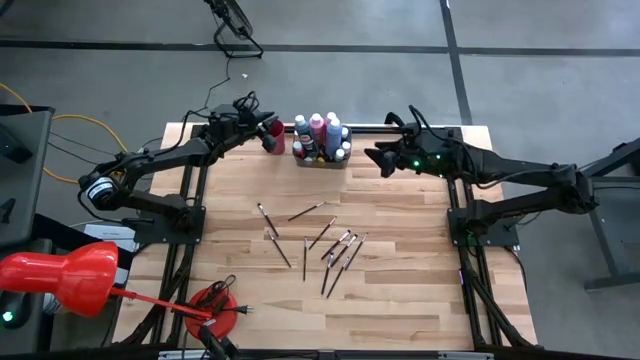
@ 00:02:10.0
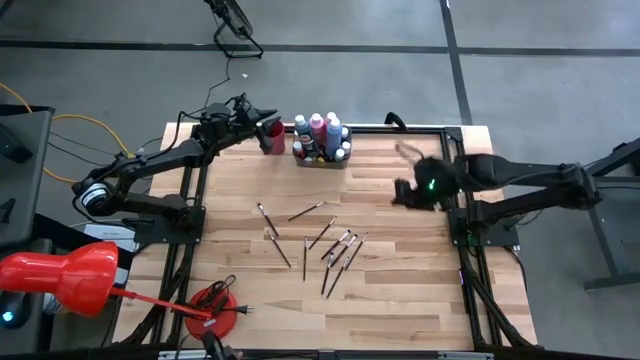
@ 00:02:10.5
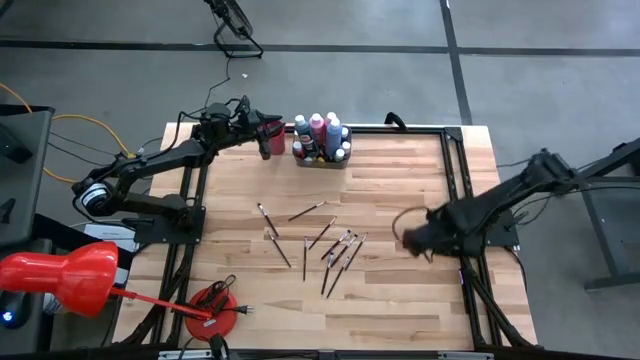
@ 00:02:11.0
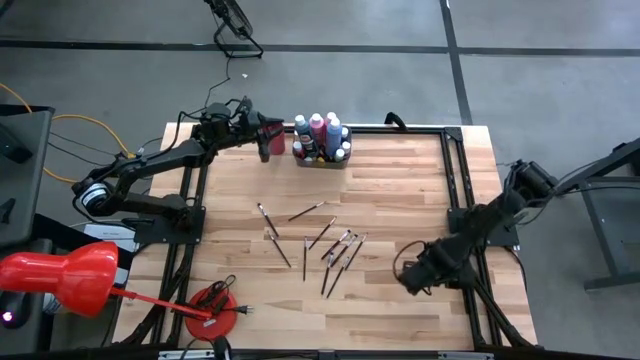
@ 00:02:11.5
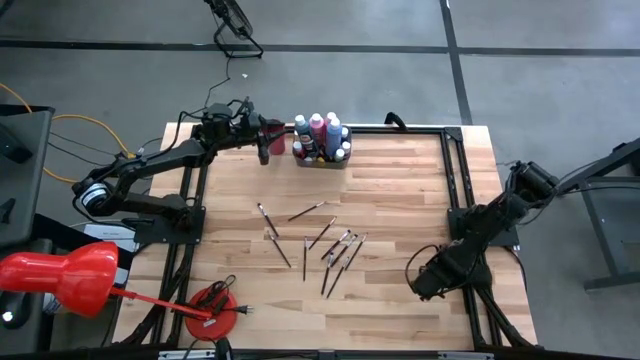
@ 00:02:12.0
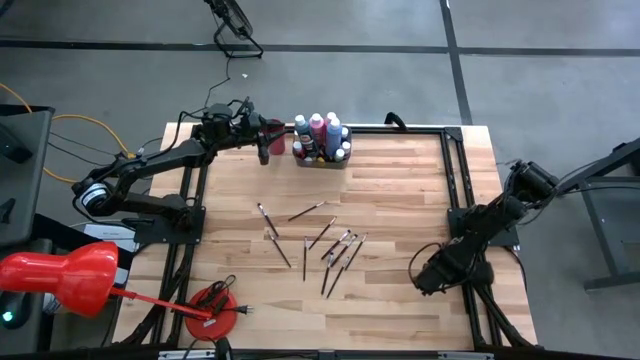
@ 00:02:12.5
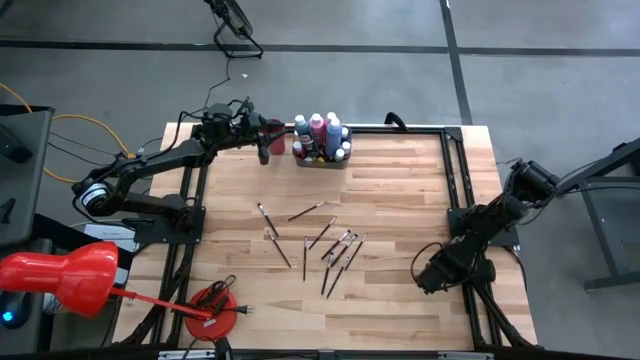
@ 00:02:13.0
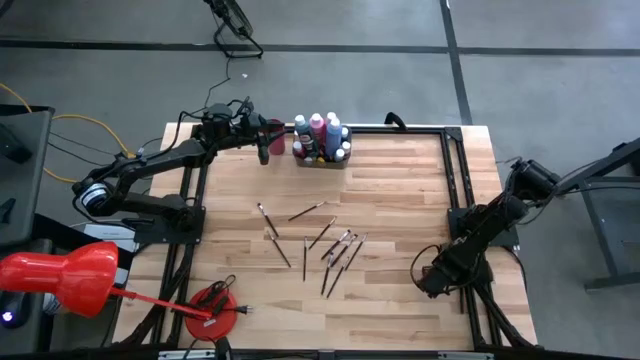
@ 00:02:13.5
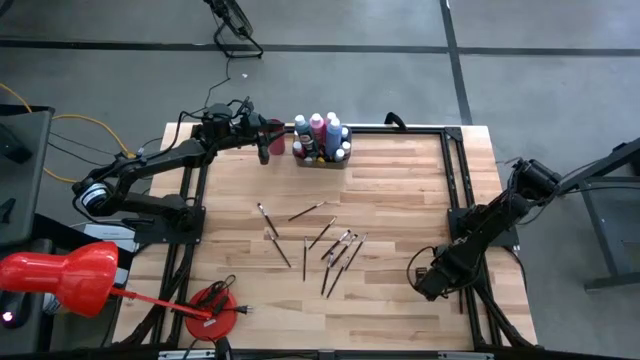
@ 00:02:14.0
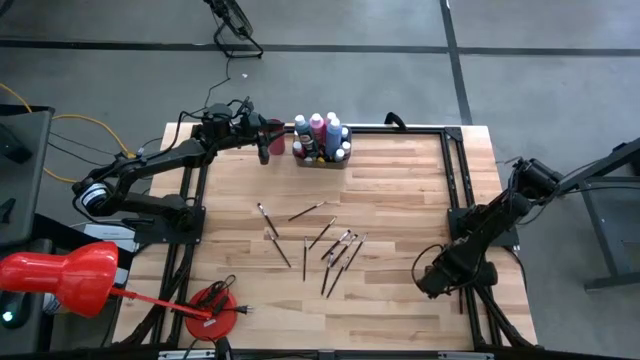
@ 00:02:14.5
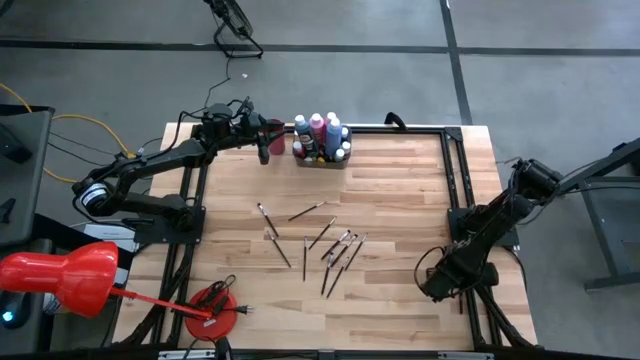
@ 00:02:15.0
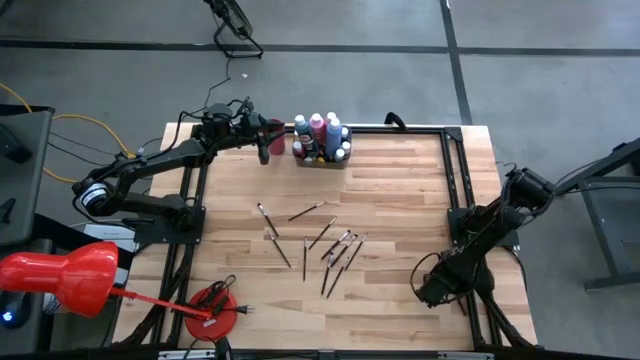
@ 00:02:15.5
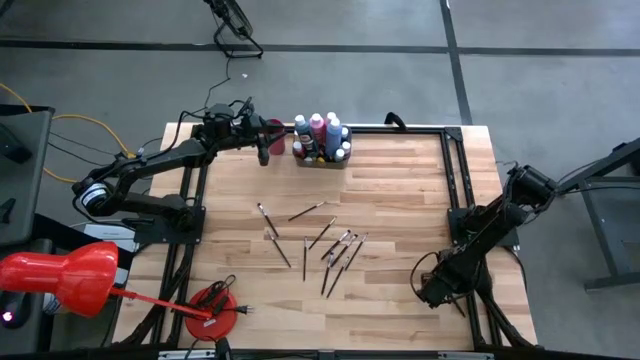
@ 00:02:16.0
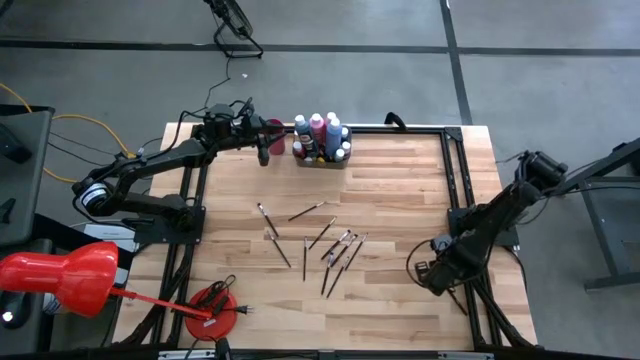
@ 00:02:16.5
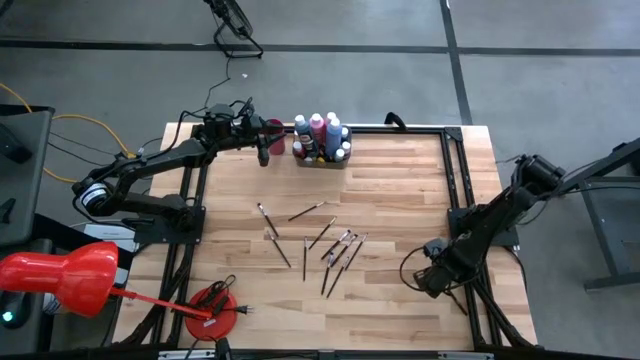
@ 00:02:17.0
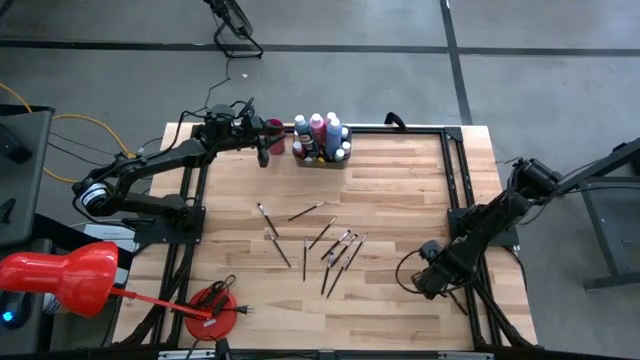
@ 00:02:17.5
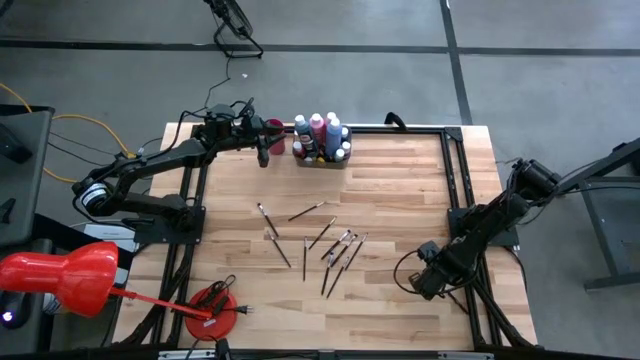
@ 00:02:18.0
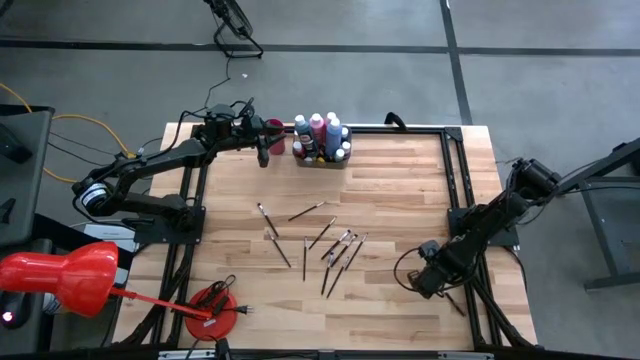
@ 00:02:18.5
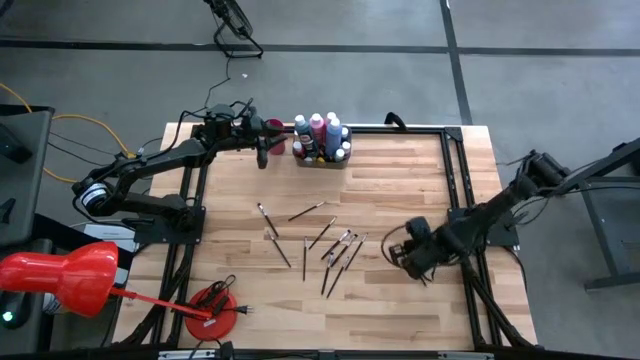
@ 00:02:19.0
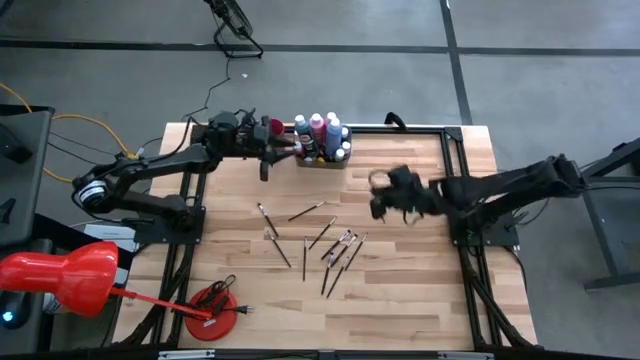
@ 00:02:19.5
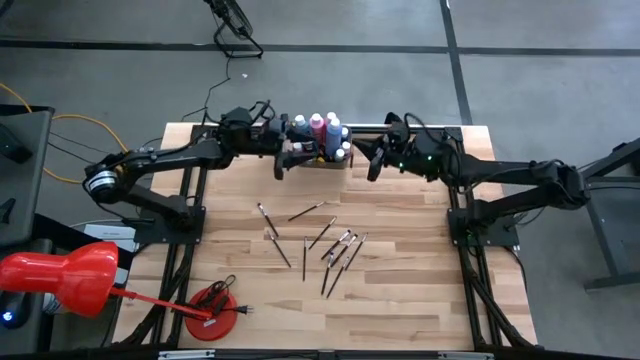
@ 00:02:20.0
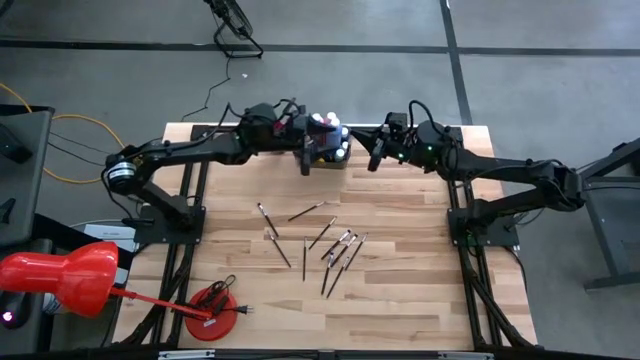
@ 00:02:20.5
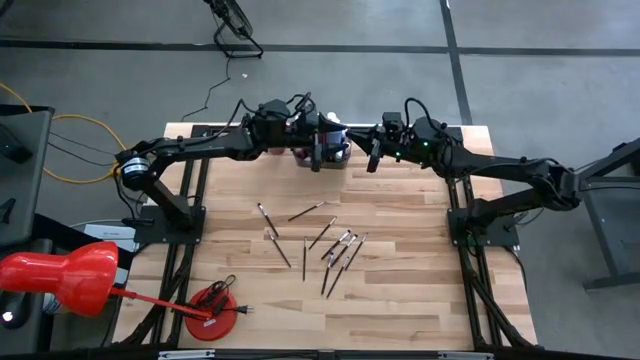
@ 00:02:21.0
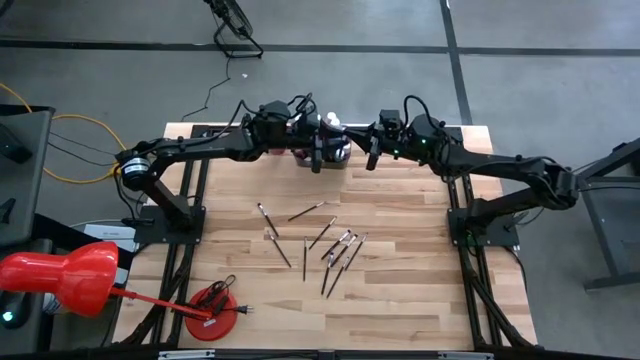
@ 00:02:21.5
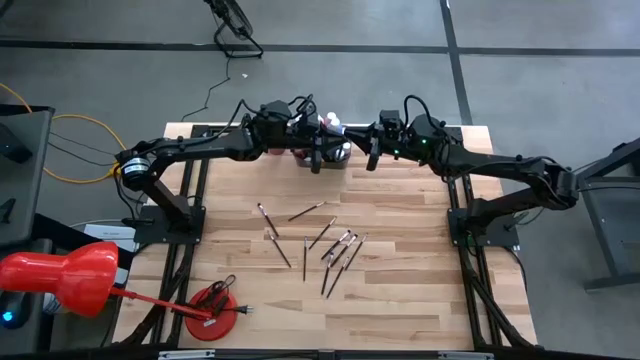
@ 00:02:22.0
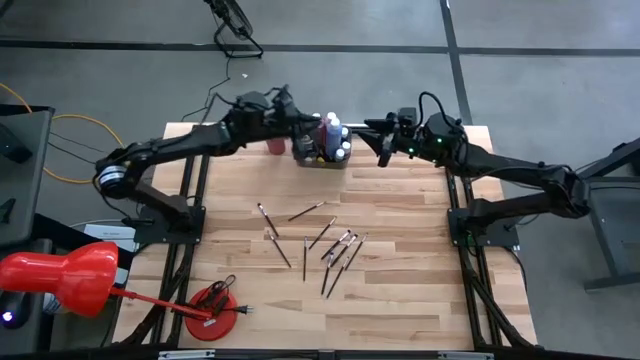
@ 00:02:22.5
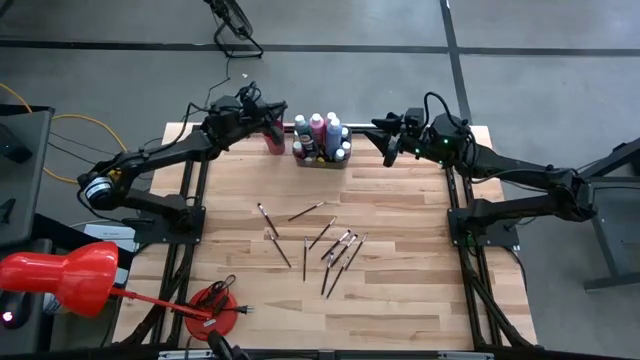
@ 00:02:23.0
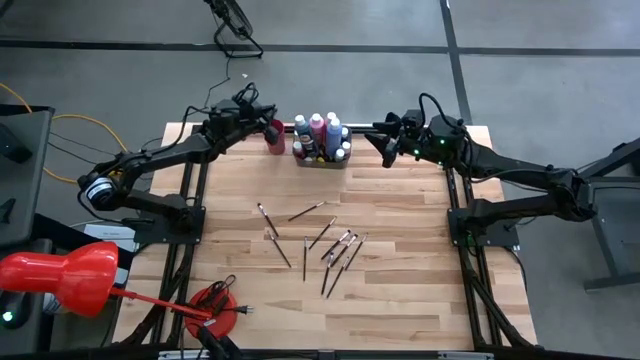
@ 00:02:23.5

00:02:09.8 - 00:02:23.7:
Task: Pick & Place Paint Supplies
Put the black paint brush into the pink cup

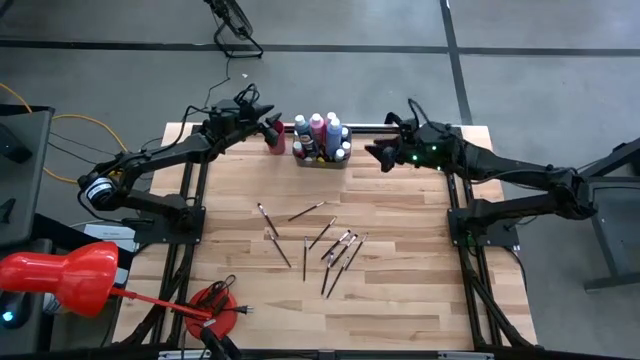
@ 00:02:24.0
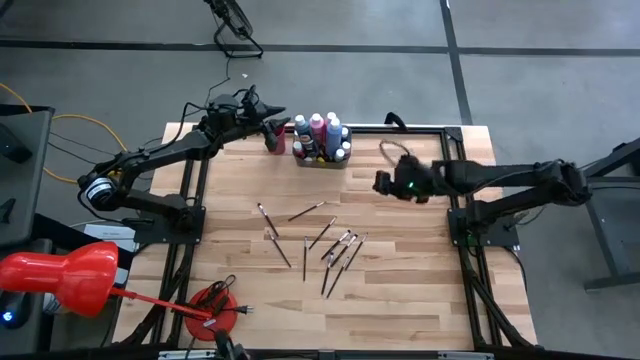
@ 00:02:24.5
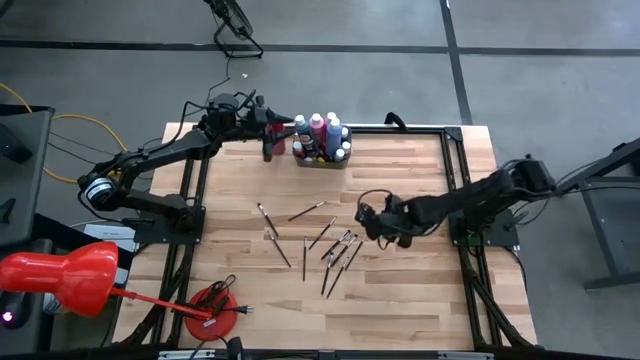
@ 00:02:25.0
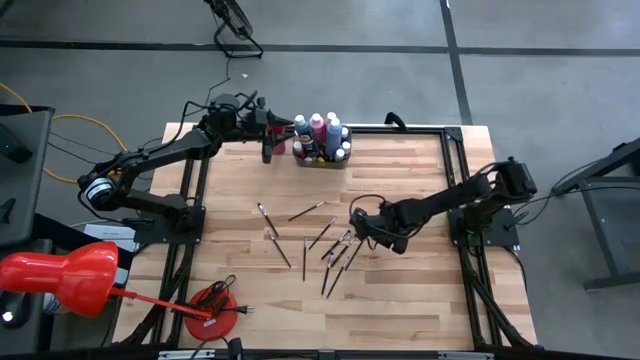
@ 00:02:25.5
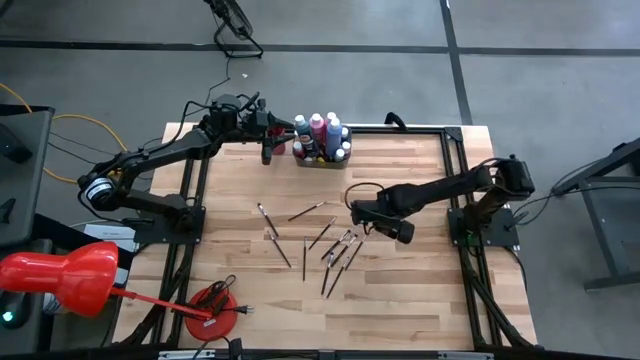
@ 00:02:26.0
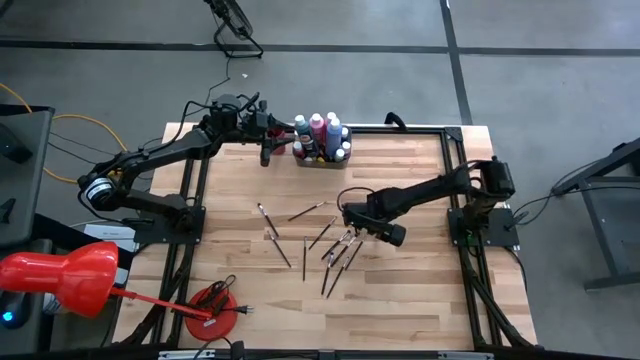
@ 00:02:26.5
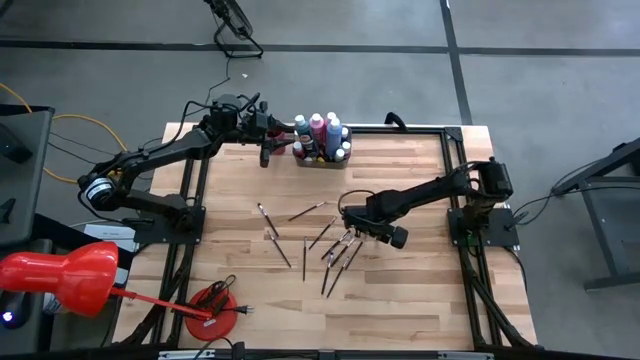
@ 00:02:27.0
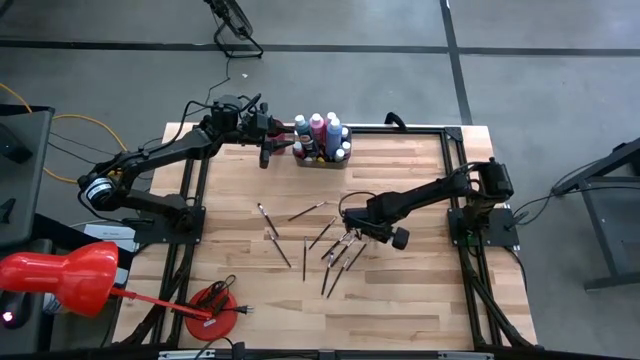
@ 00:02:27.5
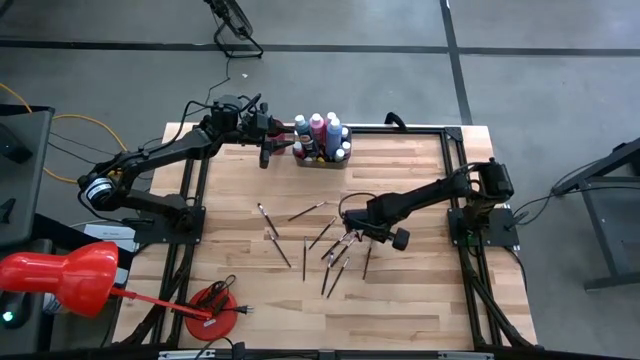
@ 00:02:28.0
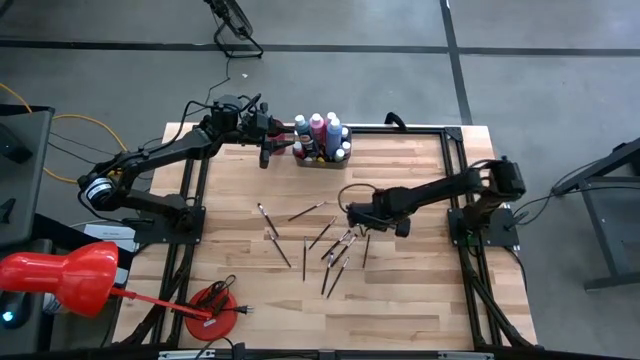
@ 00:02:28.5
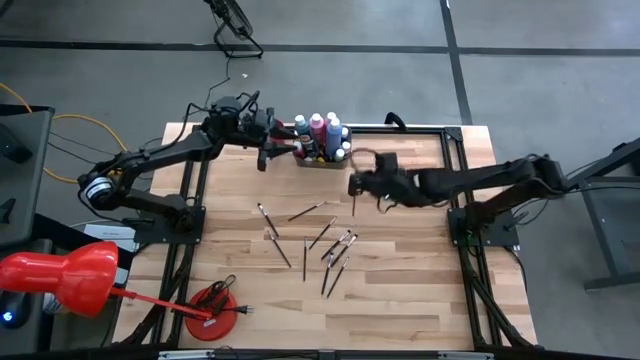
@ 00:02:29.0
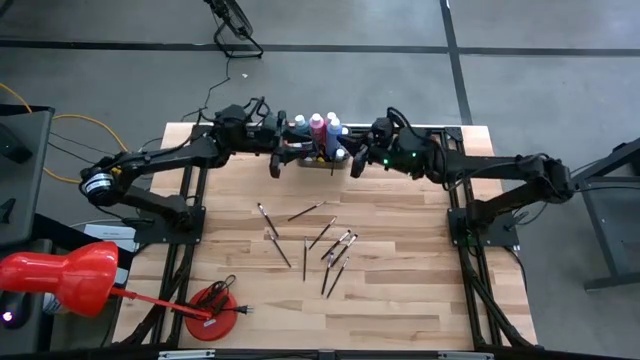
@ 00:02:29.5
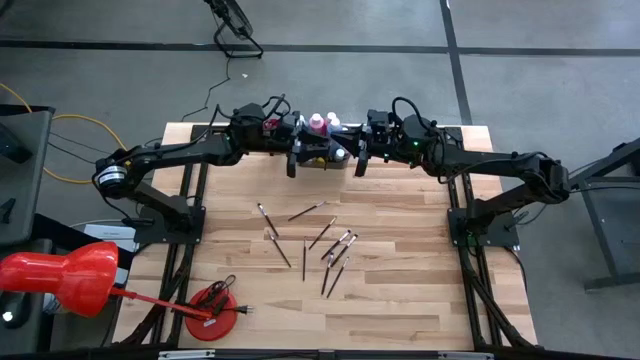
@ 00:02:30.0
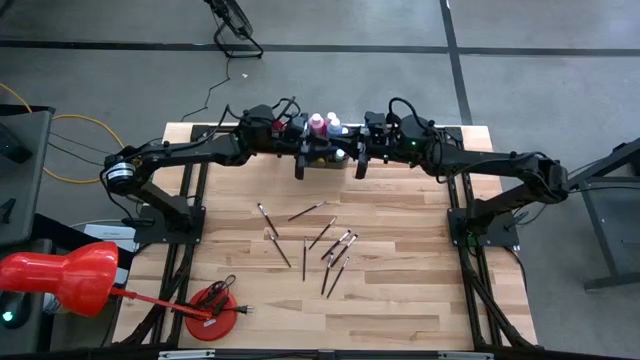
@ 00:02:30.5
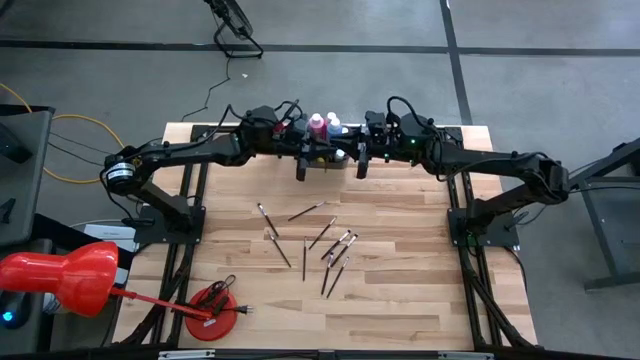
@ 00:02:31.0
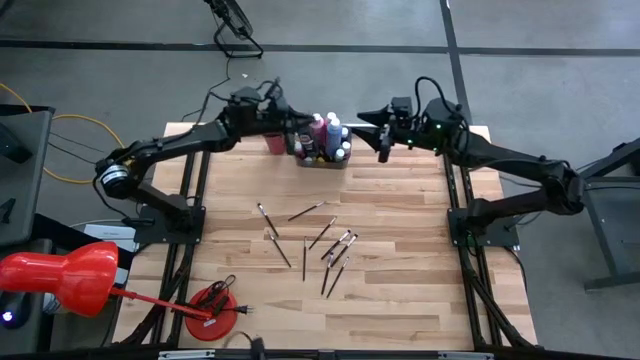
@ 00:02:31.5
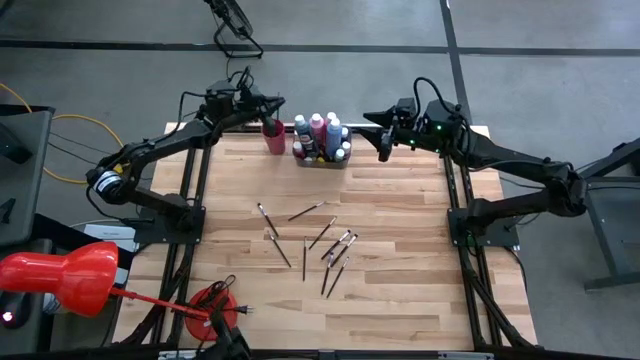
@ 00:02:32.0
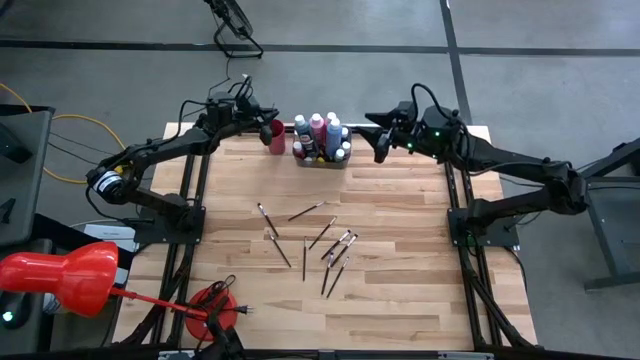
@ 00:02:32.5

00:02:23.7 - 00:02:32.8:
Put the black paint brush into the pink cup
